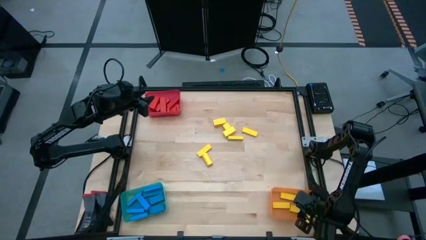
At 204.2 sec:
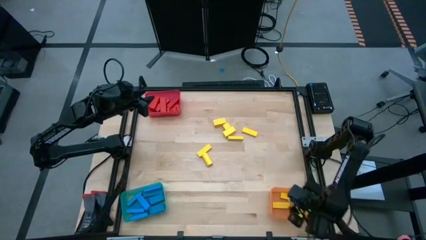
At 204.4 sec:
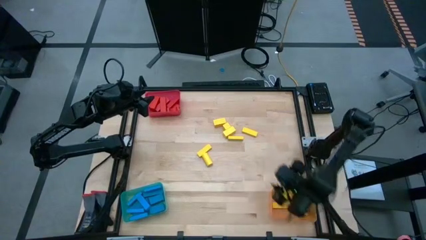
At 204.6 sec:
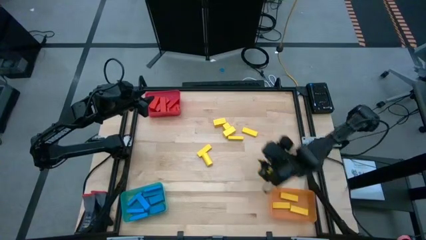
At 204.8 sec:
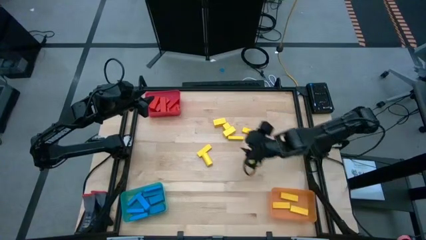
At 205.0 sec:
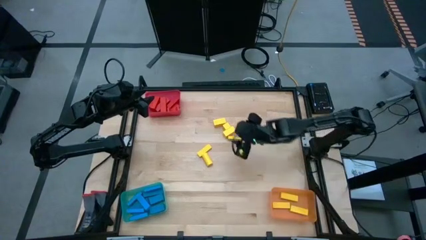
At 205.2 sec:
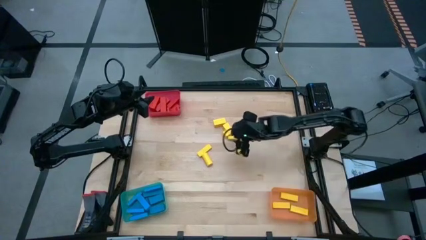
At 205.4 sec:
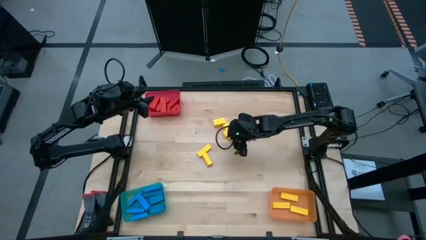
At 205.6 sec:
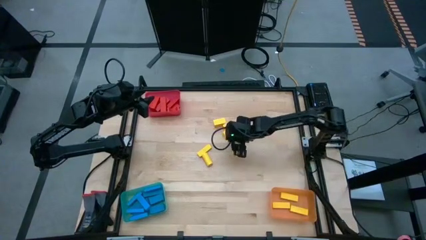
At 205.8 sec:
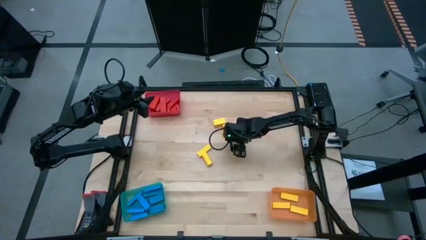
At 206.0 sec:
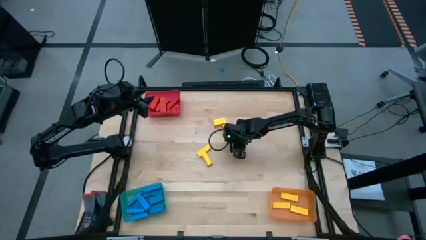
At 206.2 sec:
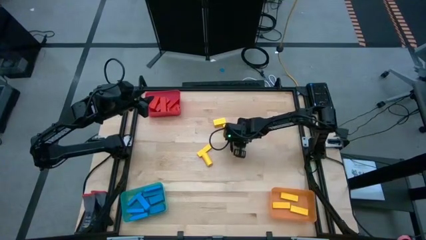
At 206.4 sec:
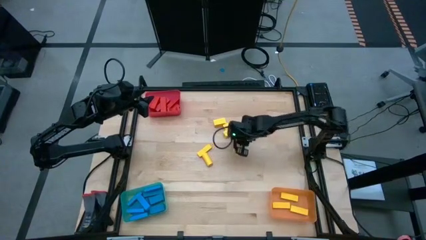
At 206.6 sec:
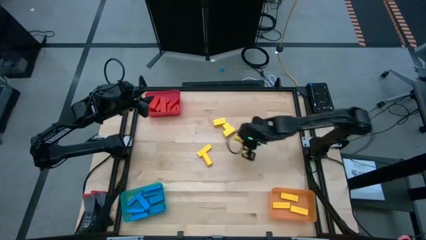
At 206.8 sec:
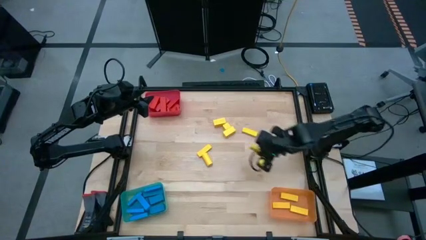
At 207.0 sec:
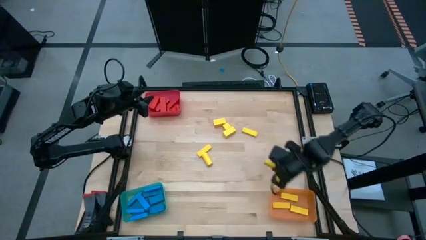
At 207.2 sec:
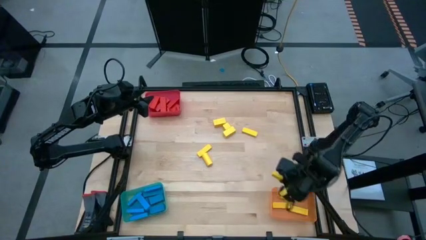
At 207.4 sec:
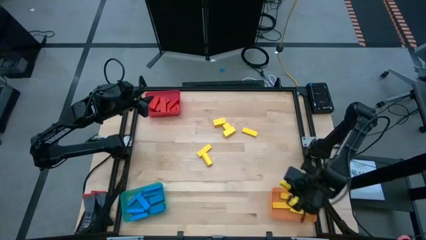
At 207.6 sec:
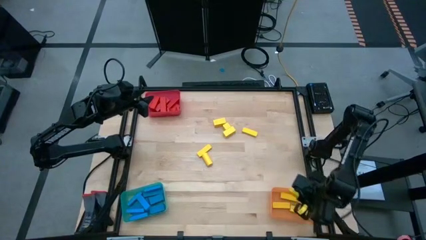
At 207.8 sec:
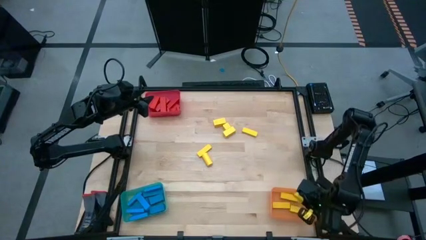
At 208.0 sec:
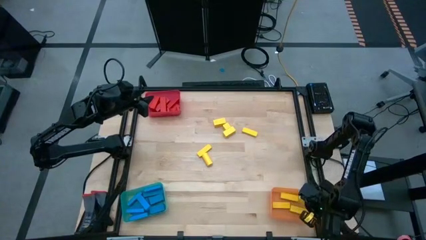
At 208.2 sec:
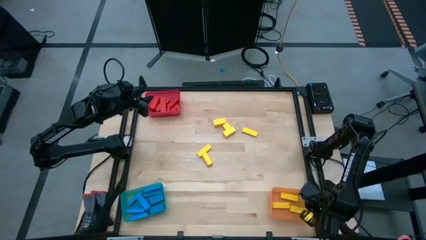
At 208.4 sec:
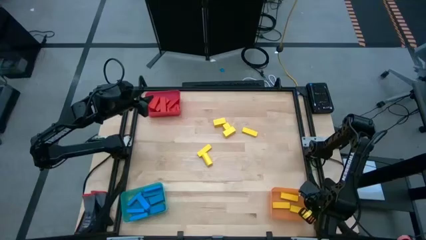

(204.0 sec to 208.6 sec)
Task: Sort blocks
Put the yellow block into the orange bin

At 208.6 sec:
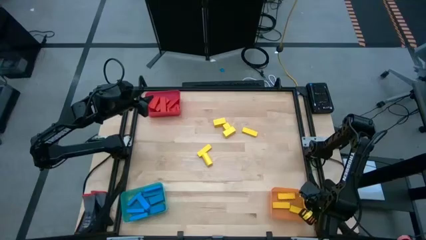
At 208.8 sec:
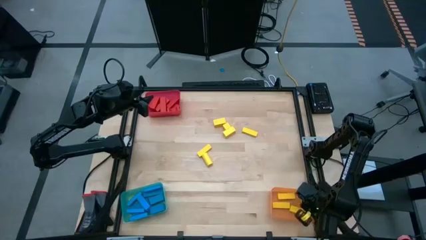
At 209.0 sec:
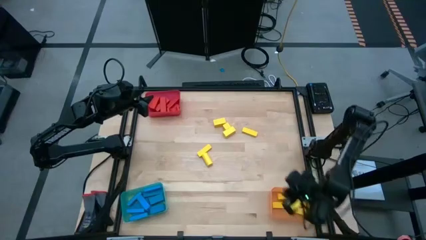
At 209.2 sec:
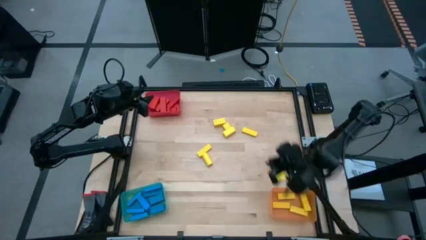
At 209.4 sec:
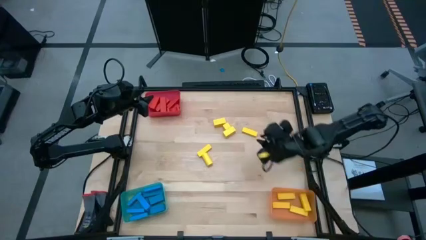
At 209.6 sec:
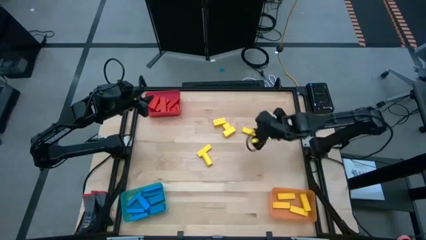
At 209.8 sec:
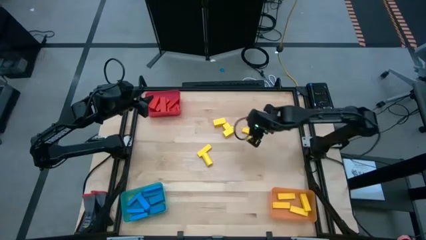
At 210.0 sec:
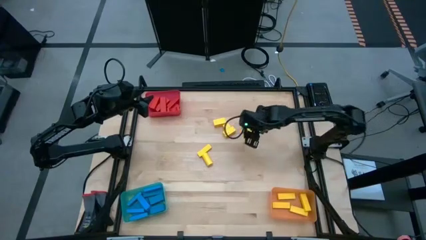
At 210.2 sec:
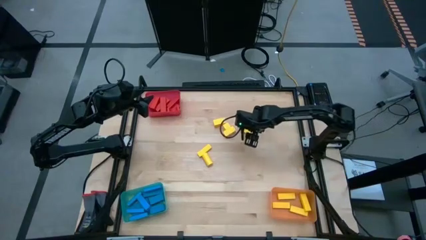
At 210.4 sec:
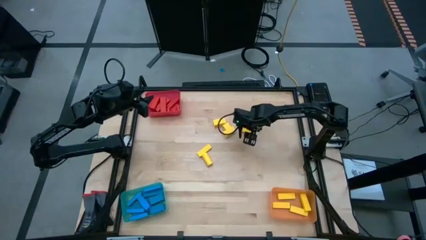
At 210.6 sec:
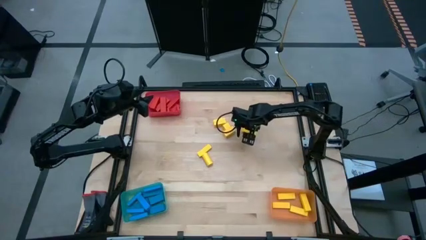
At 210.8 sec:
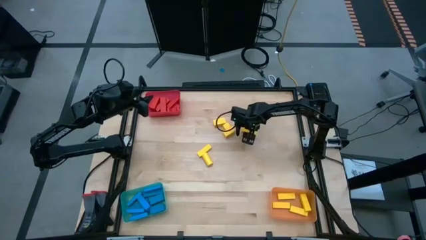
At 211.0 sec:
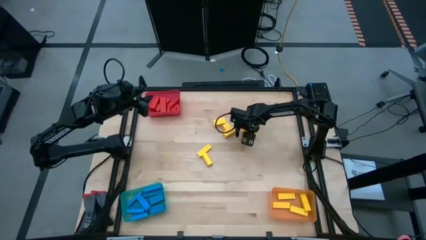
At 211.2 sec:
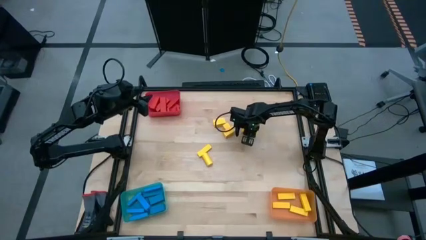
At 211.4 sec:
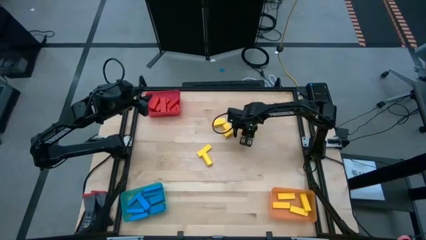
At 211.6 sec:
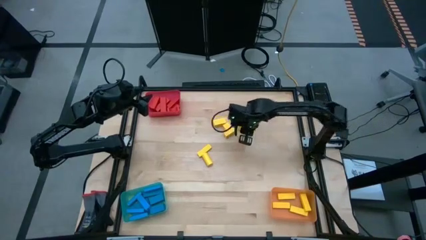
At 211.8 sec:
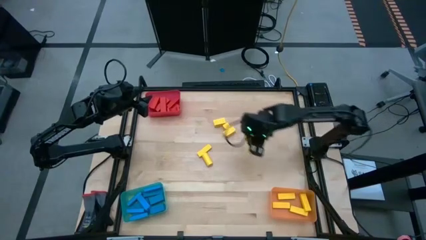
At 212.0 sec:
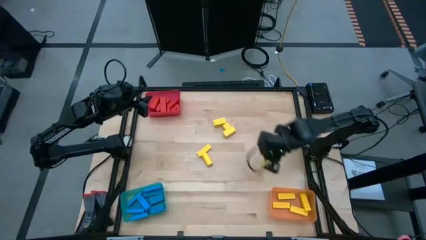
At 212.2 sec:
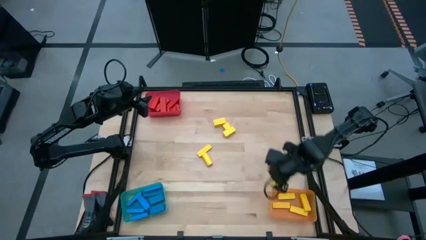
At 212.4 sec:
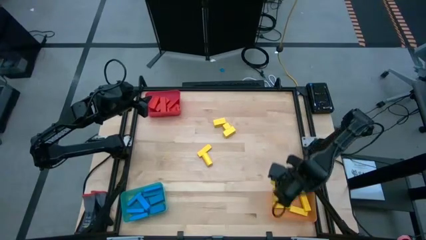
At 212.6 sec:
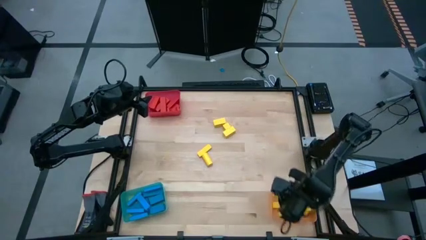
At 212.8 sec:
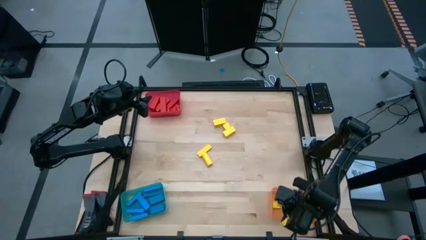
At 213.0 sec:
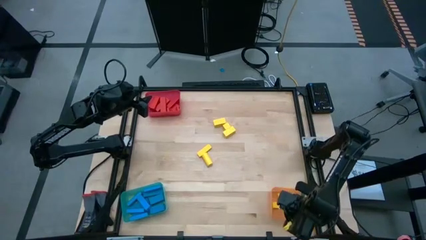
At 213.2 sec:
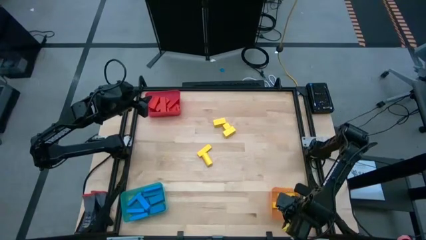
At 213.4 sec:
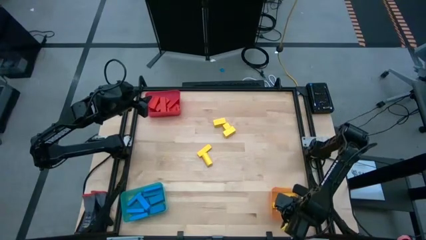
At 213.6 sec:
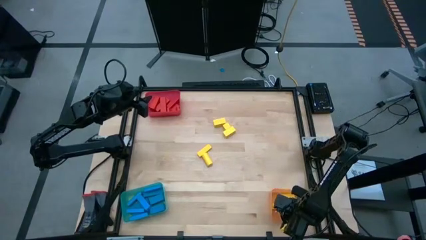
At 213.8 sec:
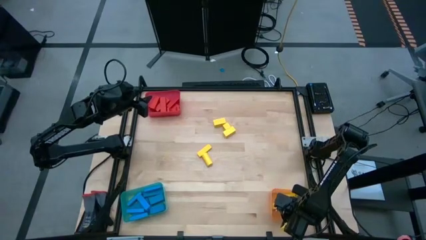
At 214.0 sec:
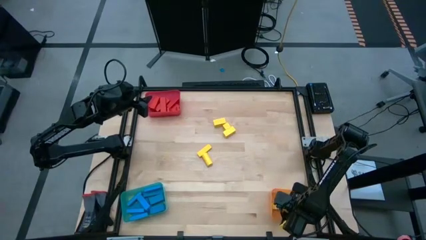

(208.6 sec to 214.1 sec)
Put the yellow block into the orange bin

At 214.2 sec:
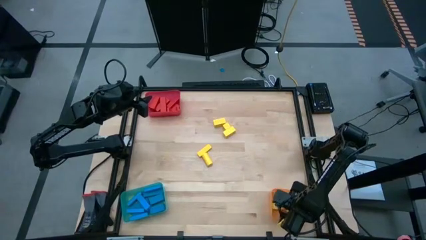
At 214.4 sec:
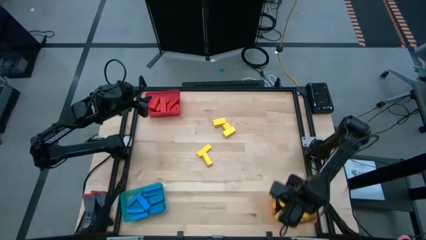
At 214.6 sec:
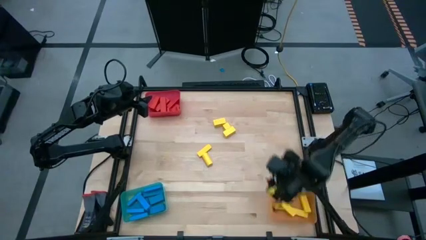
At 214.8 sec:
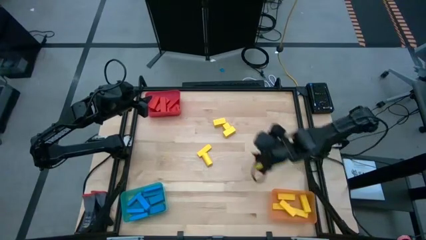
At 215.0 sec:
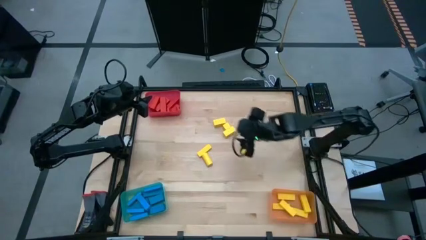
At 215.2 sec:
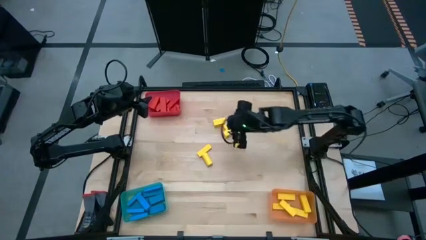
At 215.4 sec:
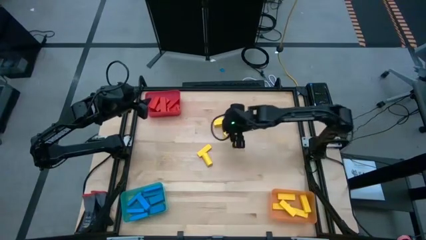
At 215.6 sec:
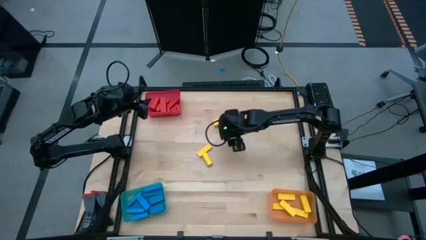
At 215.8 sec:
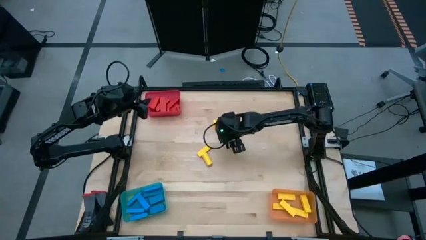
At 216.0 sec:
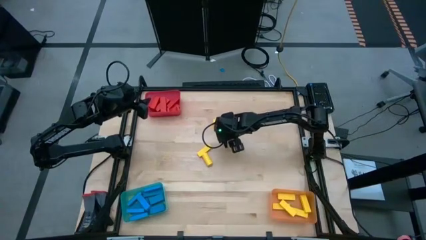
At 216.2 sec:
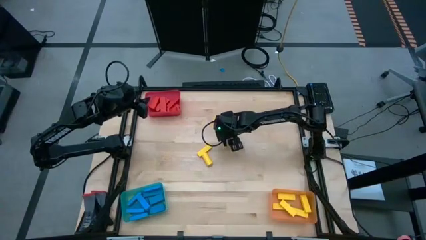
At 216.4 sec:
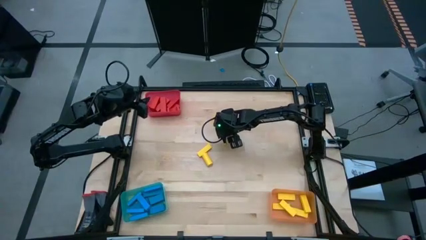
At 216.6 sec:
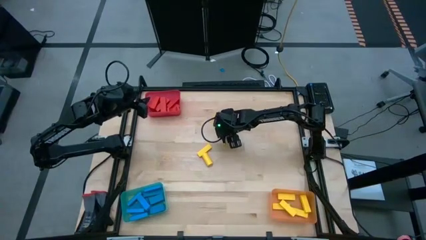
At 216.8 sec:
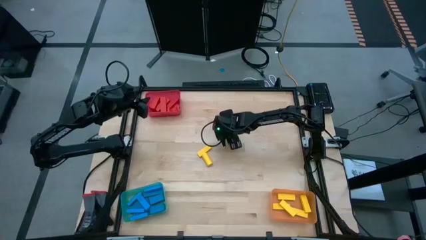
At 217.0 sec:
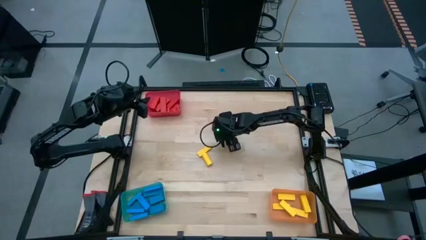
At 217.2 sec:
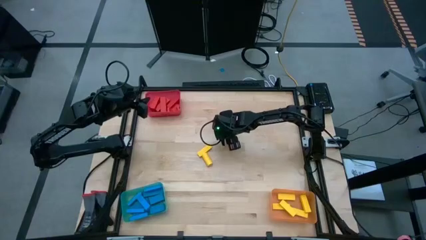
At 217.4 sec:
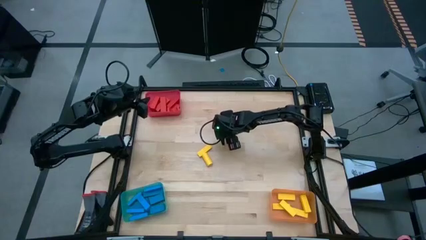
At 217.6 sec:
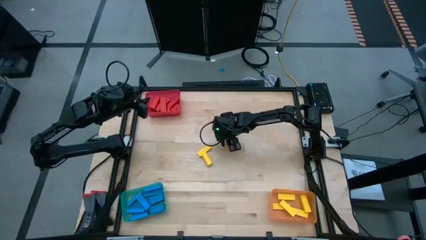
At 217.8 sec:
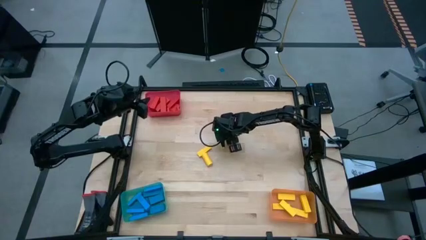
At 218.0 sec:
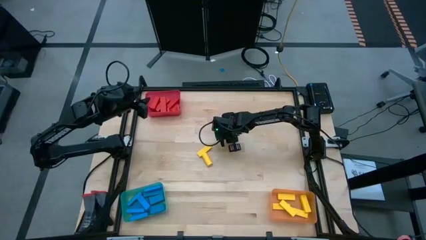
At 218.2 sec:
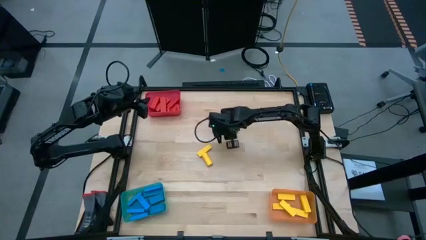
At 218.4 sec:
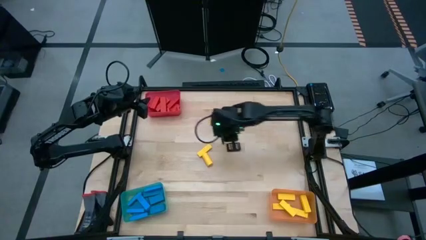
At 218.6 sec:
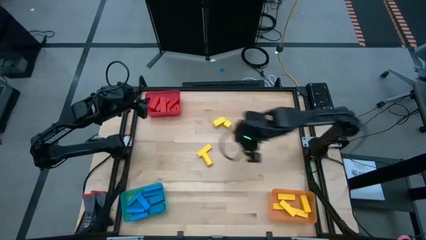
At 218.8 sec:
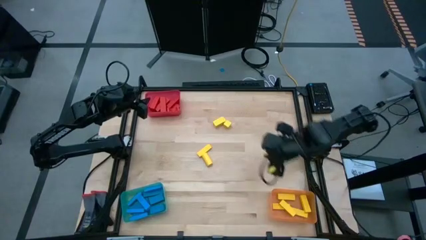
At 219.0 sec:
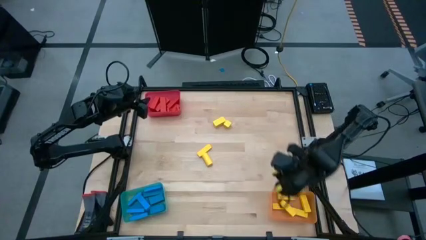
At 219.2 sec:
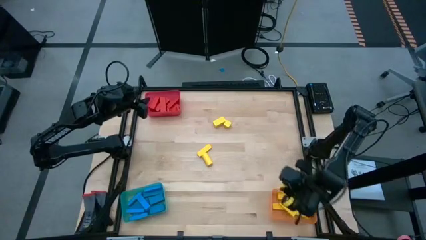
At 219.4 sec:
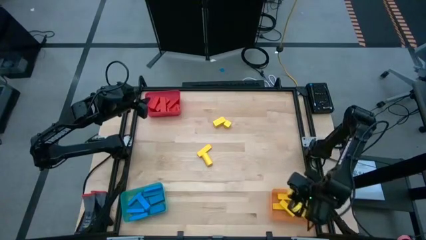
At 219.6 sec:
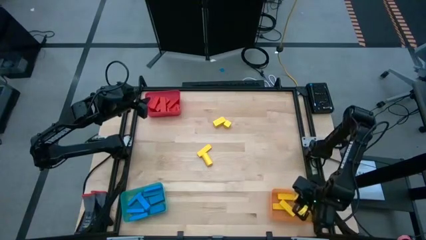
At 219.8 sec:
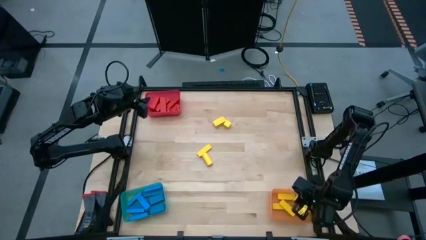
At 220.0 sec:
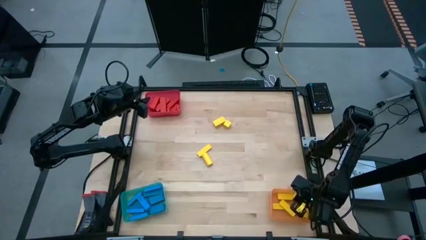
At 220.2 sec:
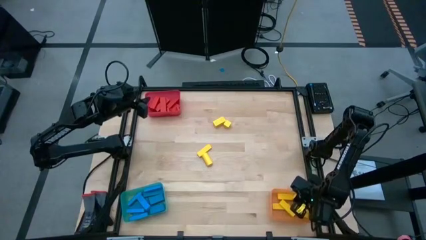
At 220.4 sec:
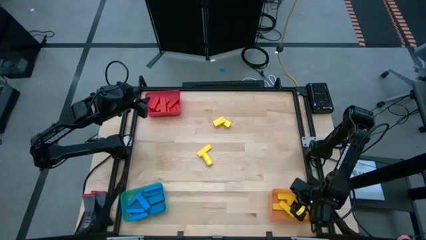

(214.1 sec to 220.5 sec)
Put the yellow block into the orange bin
